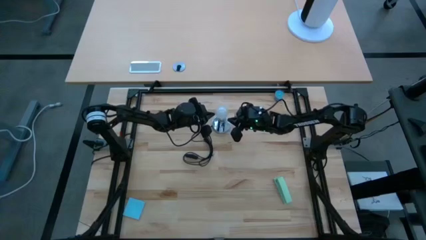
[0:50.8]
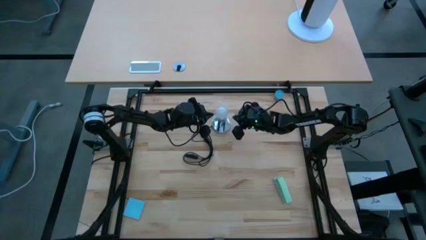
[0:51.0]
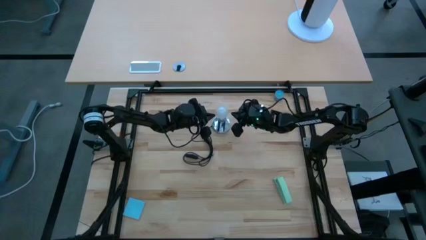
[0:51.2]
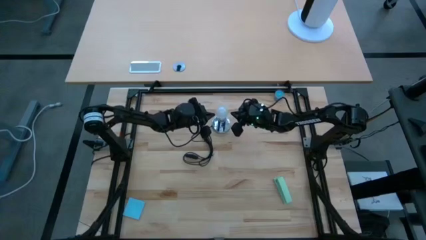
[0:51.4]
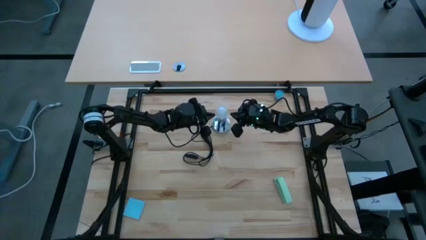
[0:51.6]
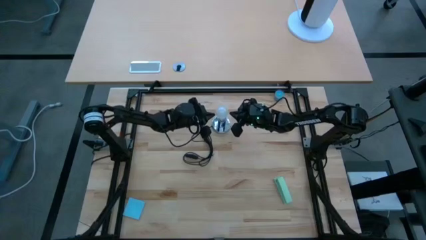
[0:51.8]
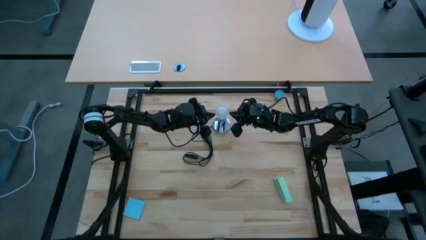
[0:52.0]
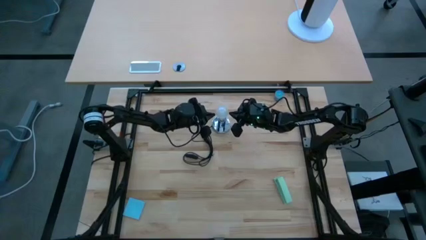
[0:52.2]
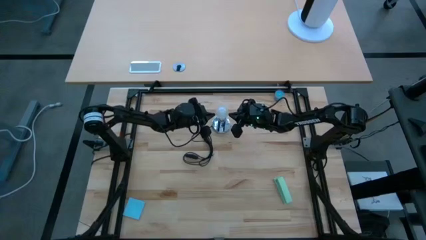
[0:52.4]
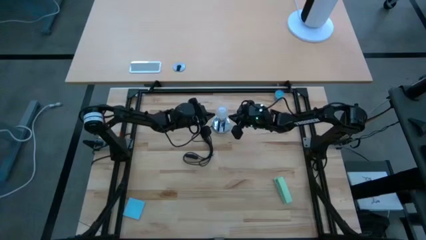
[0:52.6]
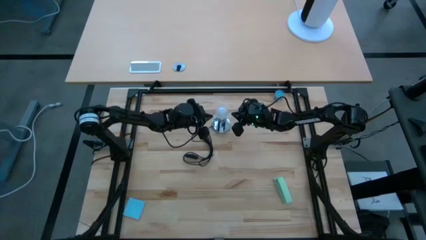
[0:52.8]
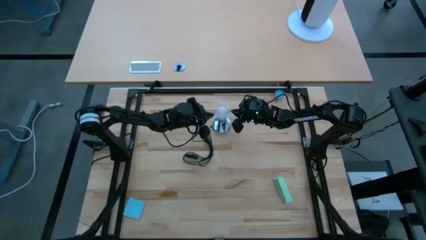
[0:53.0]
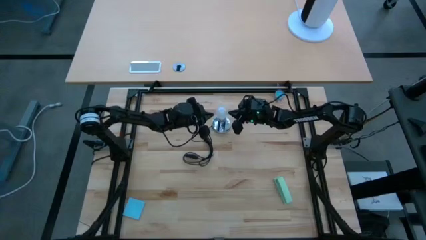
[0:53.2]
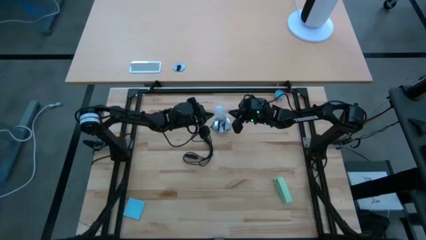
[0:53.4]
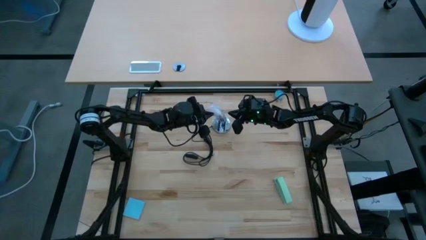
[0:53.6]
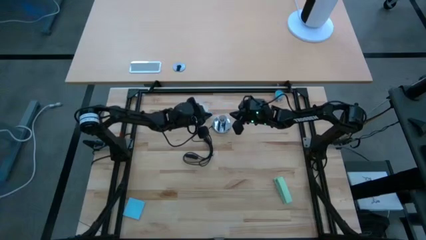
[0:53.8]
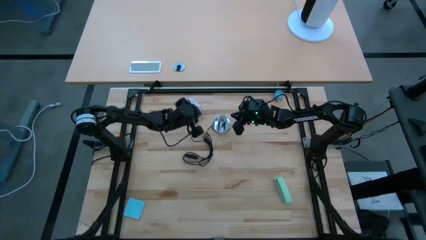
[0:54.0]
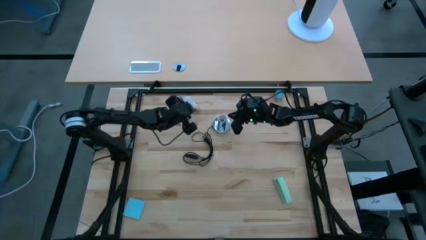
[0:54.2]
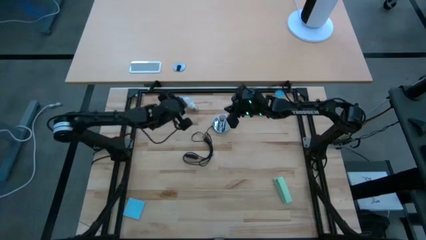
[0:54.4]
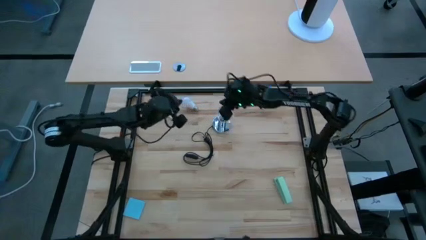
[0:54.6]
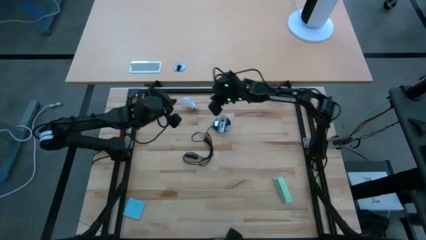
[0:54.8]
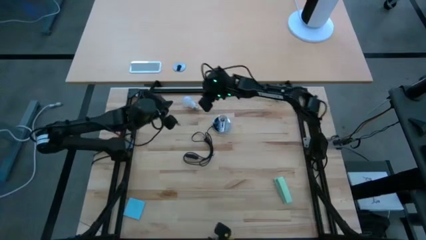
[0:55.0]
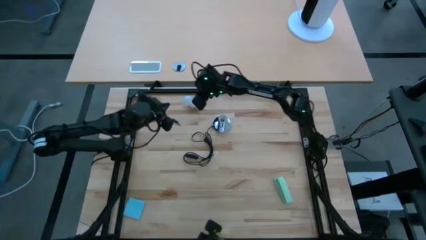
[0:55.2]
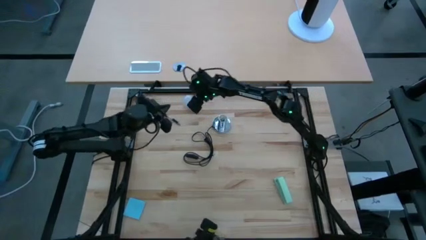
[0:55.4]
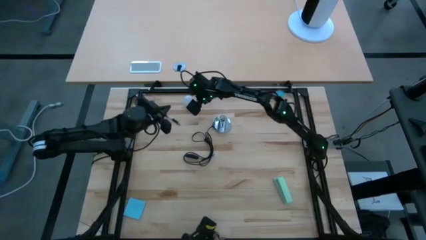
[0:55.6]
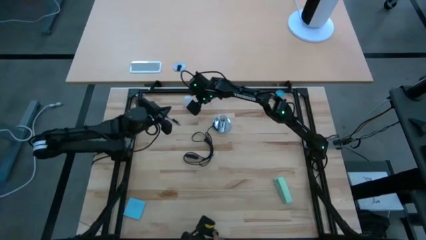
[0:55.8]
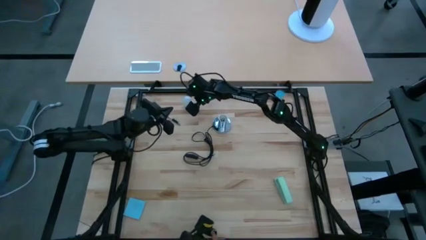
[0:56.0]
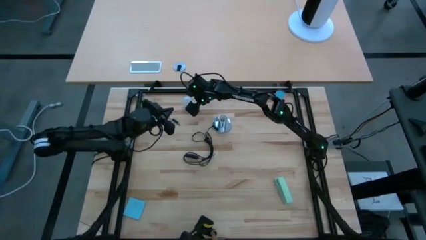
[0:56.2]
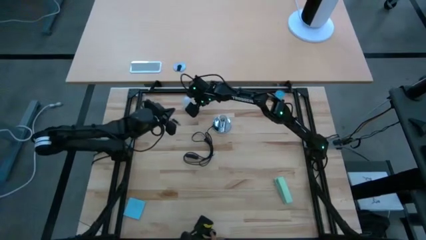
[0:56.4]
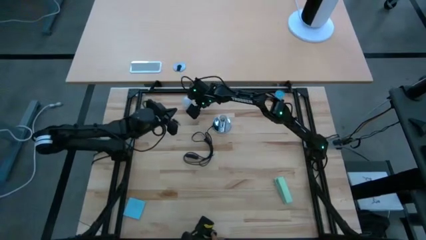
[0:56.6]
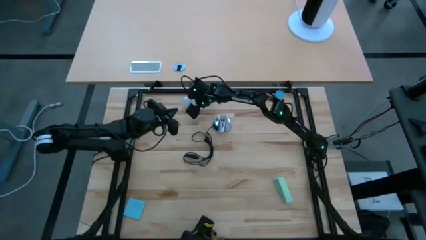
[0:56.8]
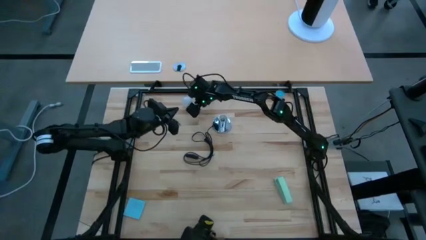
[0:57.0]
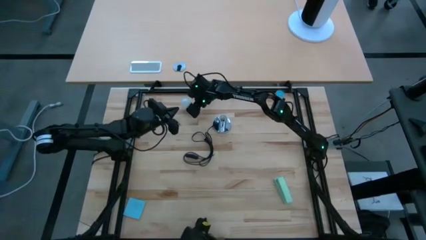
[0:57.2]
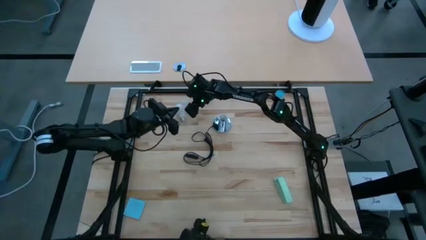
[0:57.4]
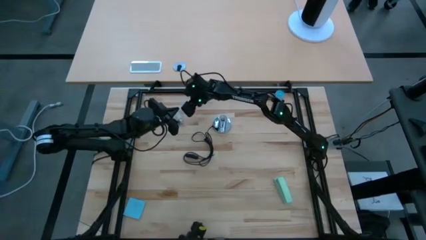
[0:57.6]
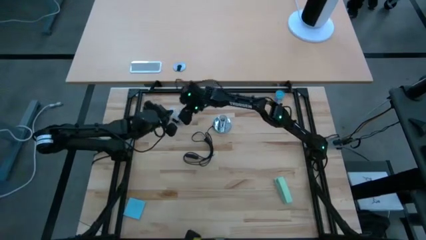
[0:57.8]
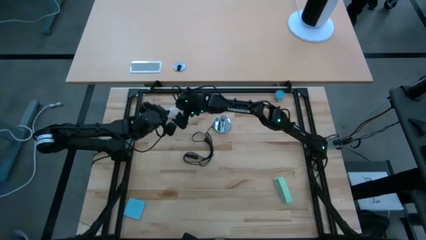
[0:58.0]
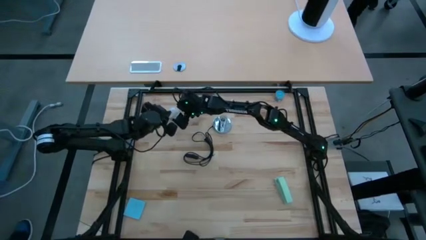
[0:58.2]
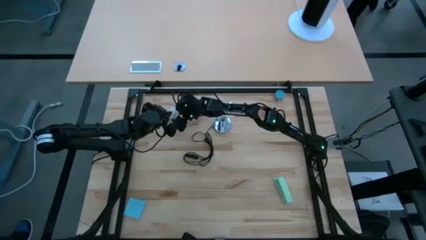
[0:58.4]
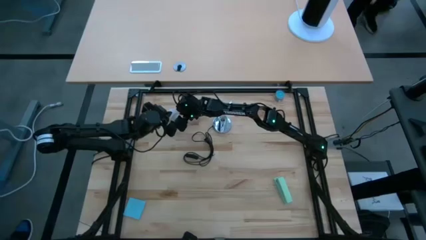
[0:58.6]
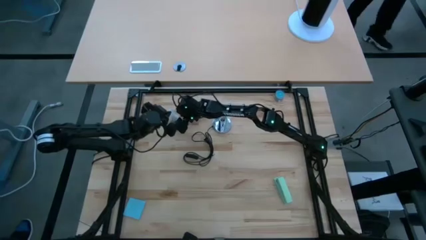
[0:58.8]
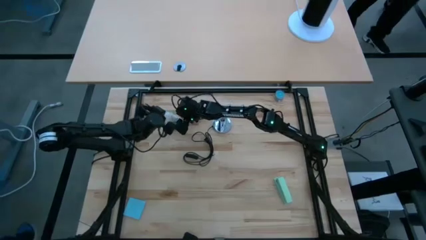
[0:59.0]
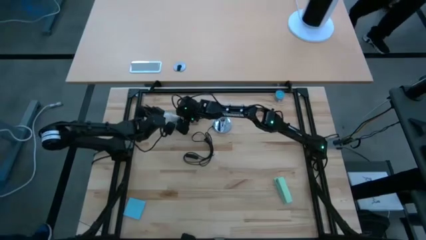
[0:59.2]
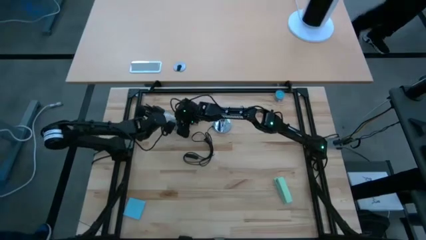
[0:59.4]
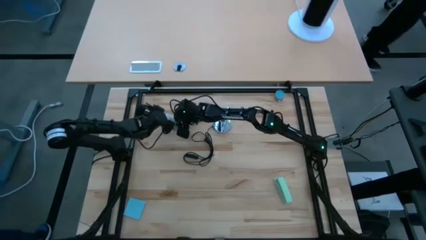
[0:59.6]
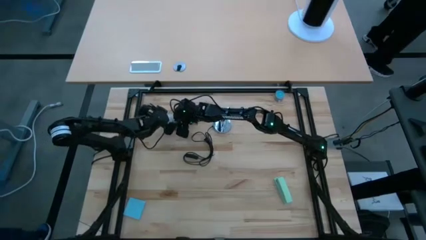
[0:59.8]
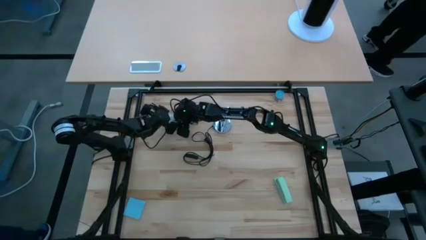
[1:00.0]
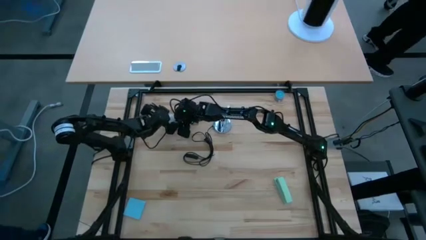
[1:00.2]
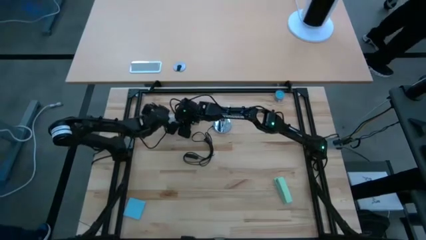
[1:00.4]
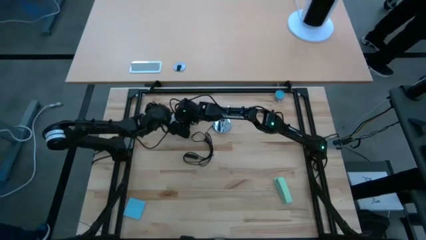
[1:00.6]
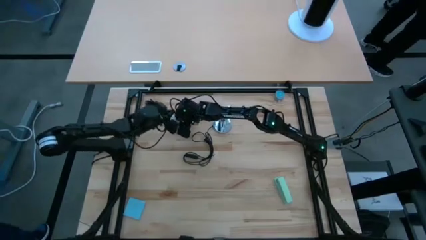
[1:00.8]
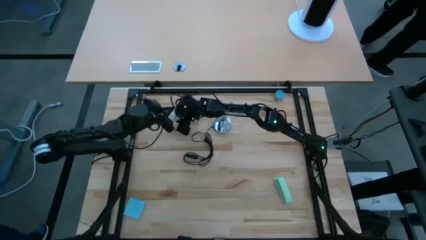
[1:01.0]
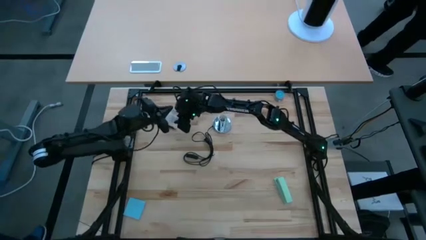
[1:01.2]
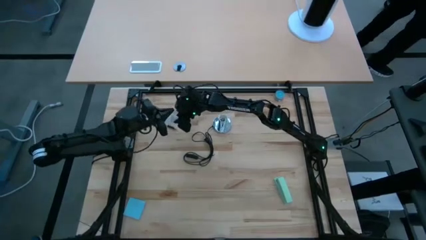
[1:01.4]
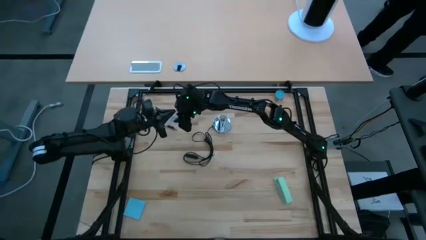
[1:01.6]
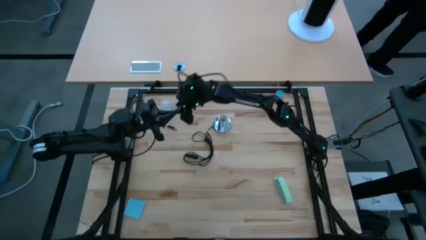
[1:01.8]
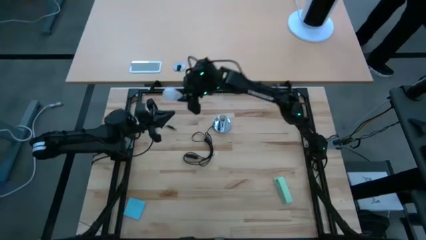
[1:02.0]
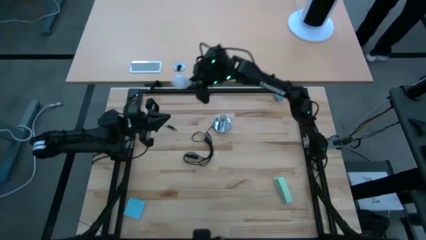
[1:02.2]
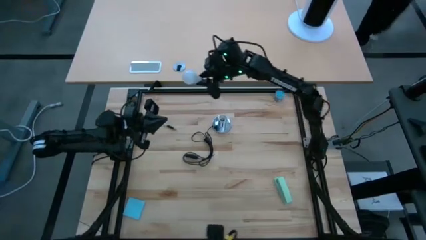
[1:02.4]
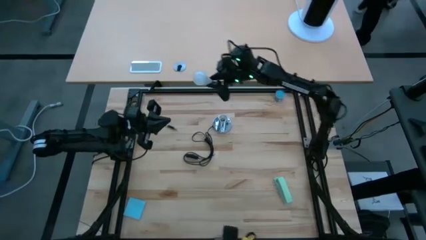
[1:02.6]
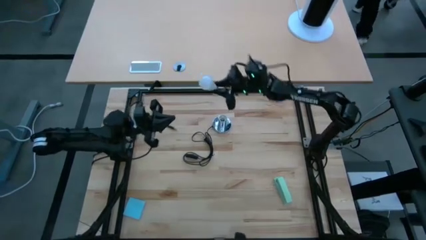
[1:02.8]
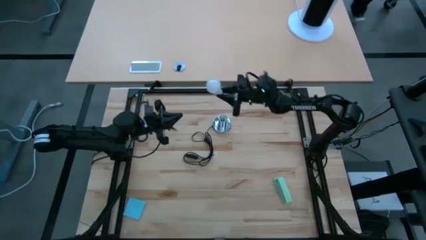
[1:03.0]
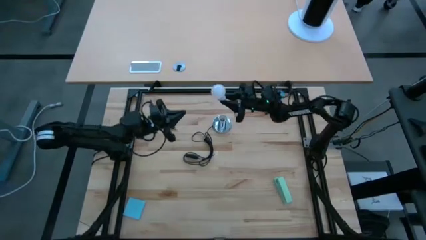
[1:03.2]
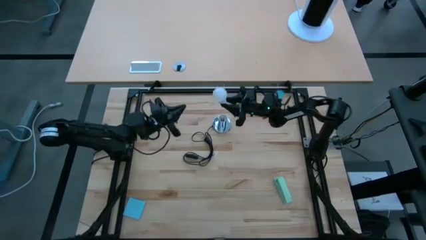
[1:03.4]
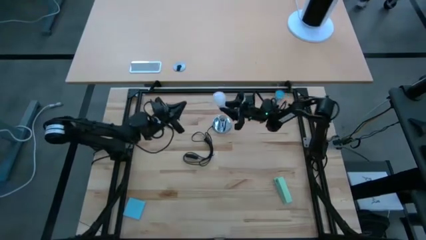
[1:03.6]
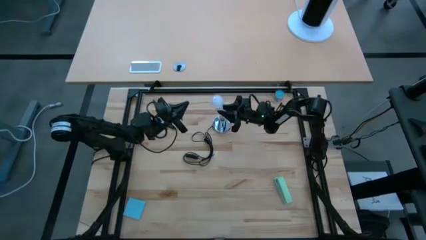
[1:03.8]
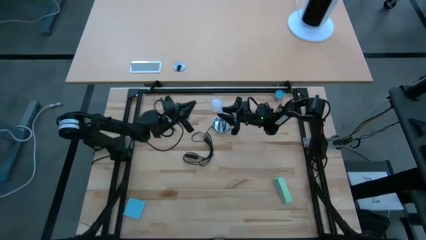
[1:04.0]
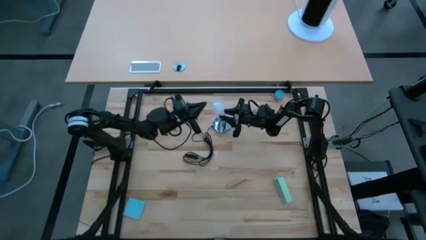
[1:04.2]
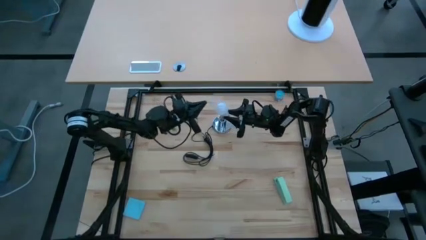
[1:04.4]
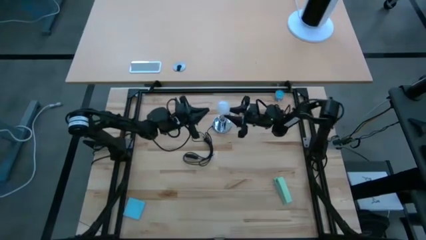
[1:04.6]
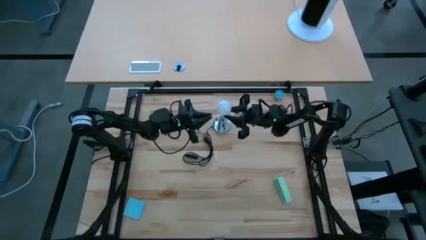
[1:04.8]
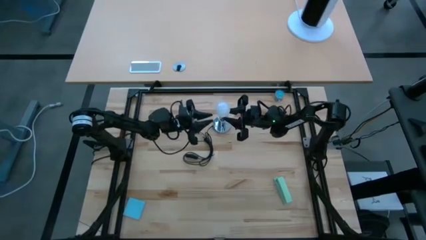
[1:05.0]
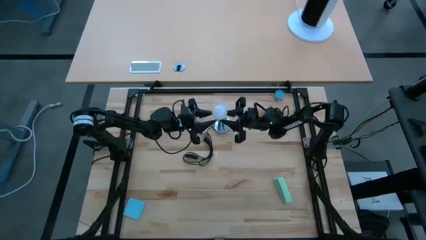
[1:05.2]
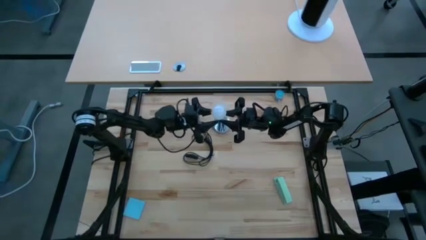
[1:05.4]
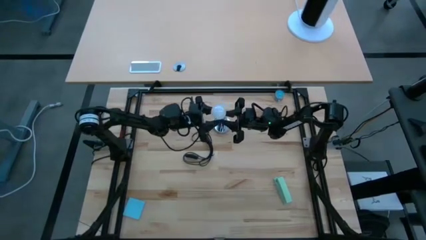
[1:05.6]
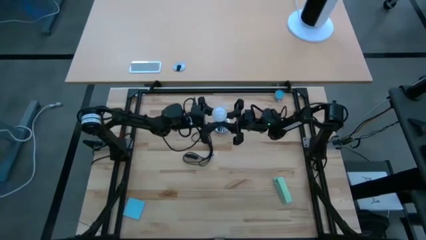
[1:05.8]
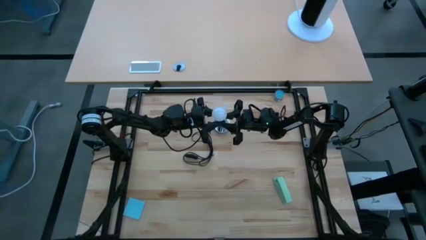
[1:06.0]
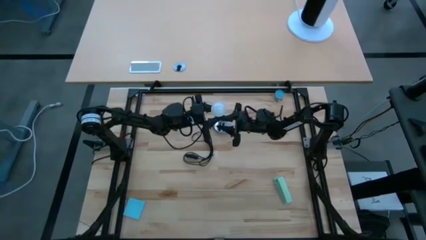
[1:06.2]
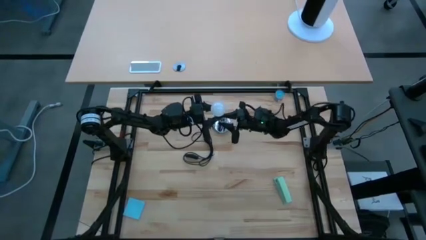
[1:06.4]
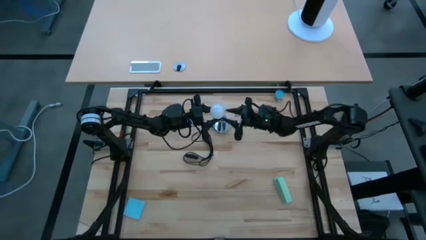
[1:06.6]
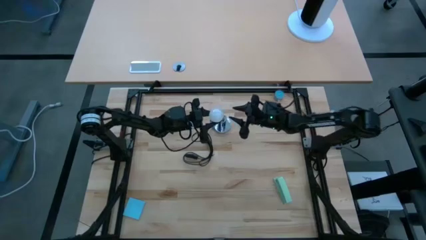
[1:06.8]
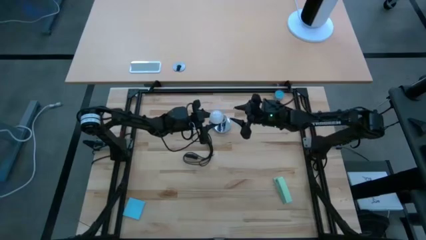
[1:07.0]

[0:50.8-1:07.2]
Task: Screw lightbulb
Insert the lightbulb into the lamp
